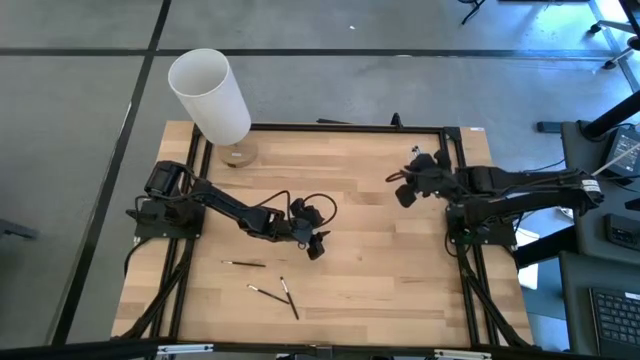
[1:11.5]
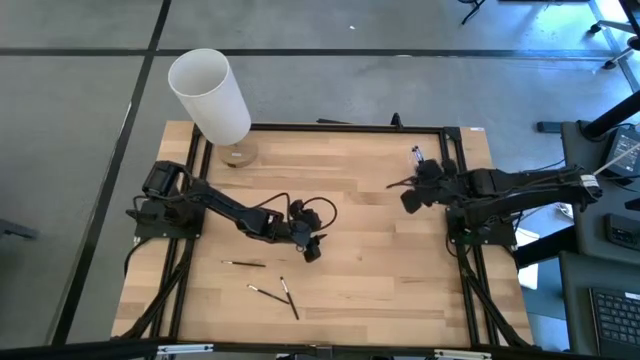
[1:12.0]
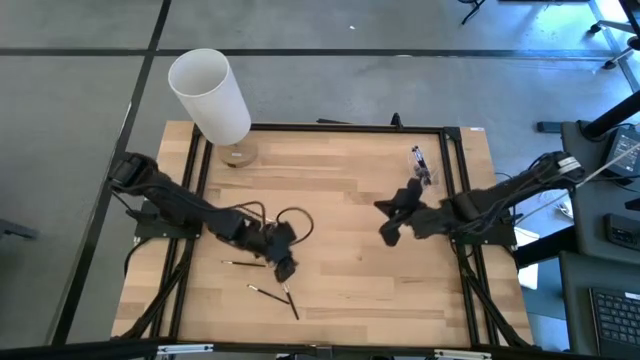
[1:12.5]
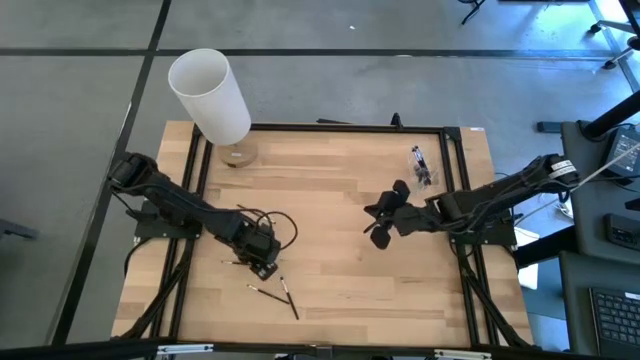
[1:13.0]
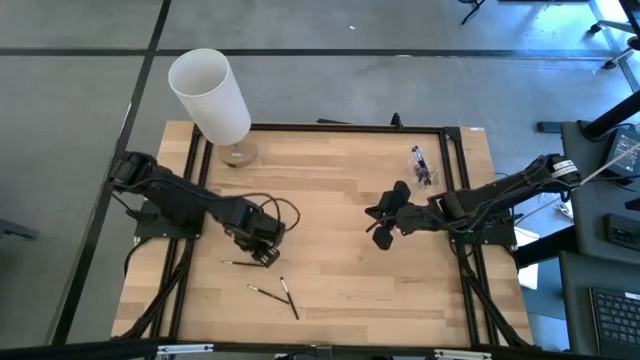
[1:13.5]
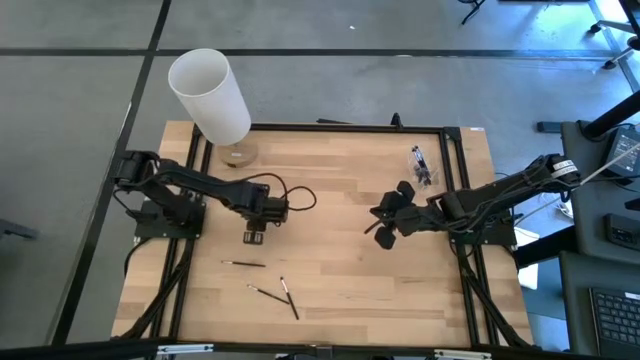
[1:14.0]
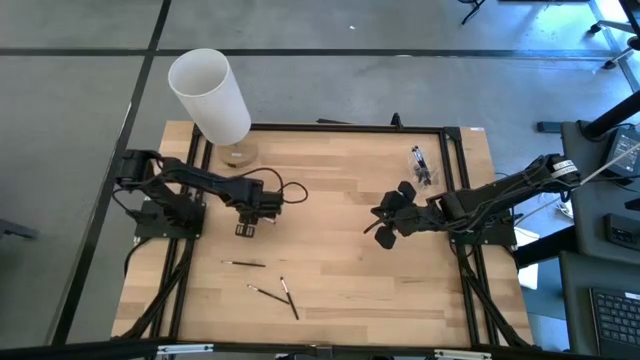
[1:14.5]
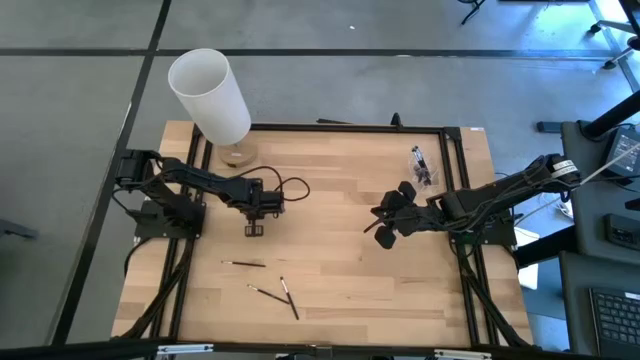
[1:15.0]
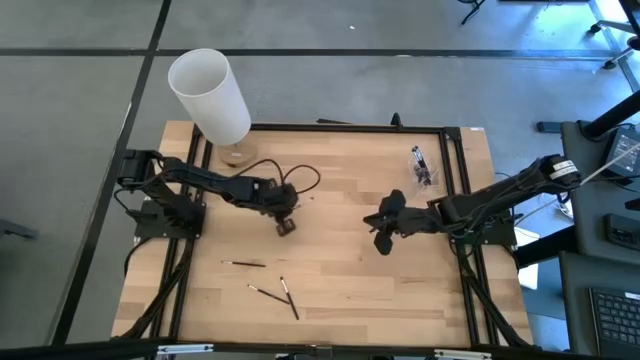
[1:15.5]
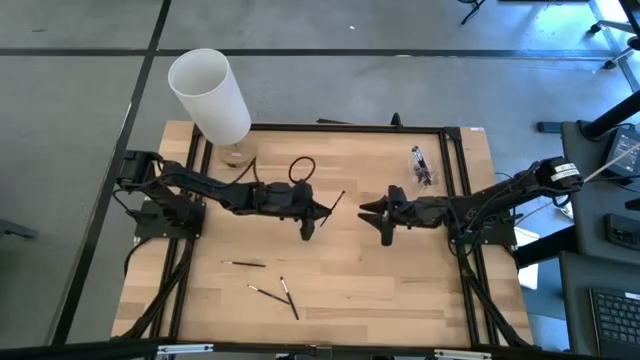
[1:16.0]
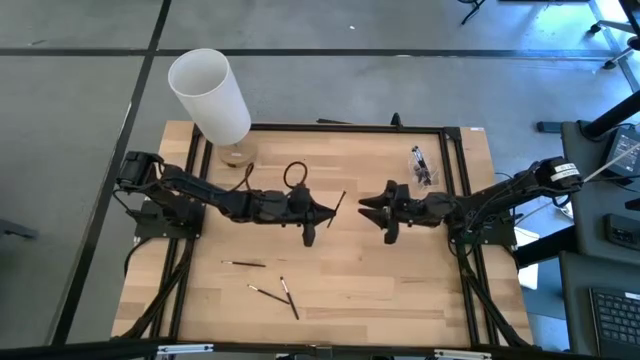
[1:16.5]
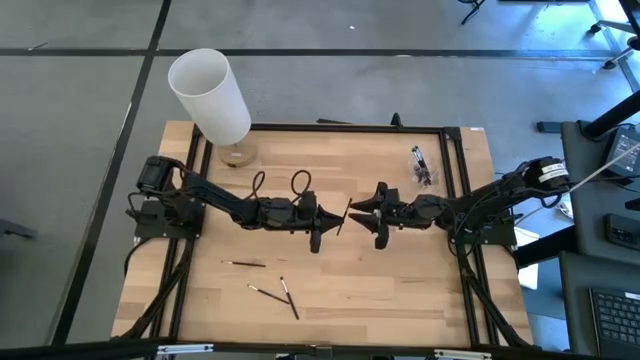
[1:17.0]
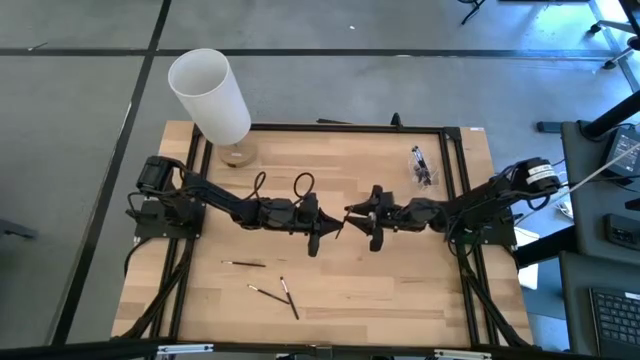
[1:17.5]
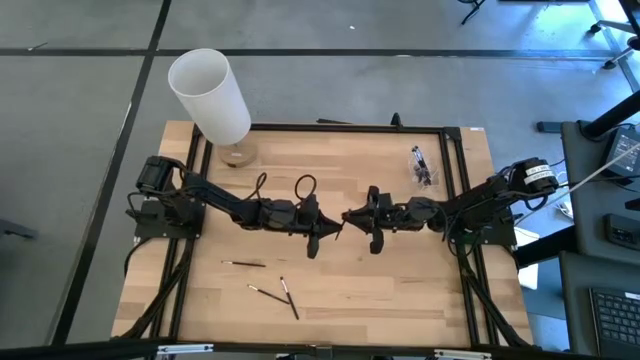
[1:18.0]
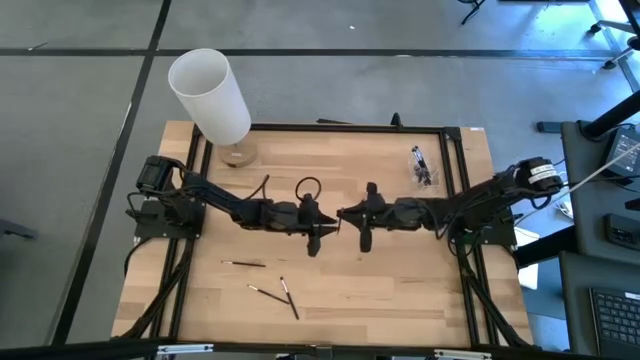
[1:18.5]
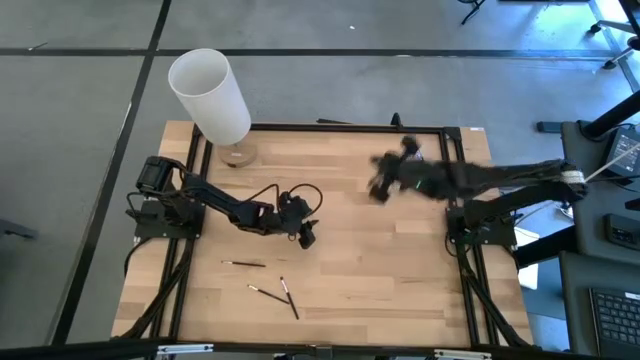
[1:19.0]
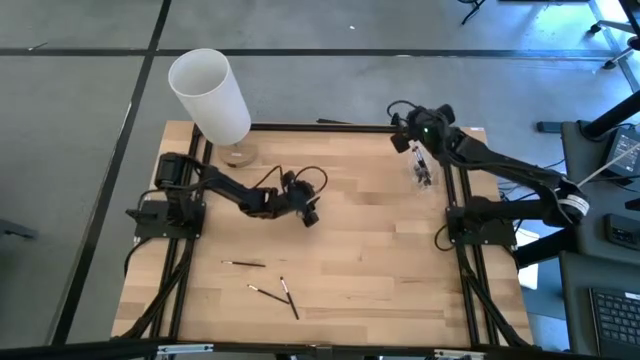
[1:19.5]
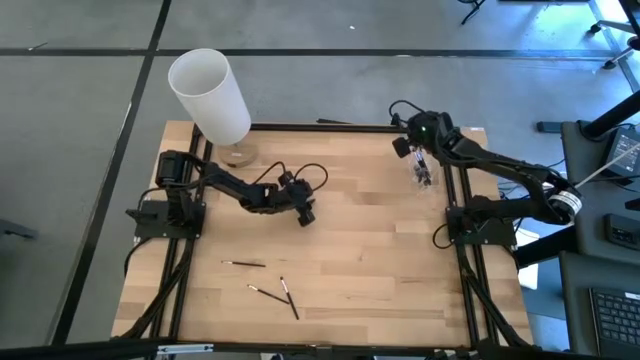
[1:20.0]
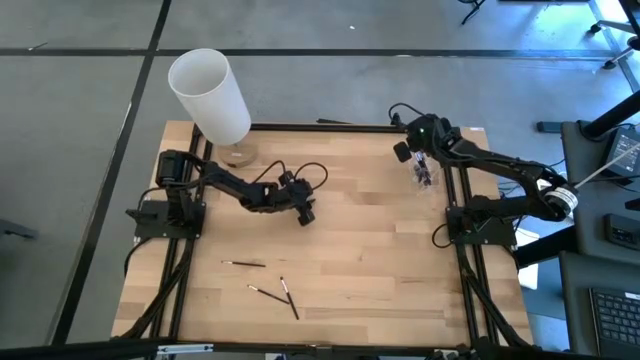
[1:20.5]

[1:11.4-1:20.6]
Task: Sort items
Put the eyeshadow brush into the top section of the transparent organizer

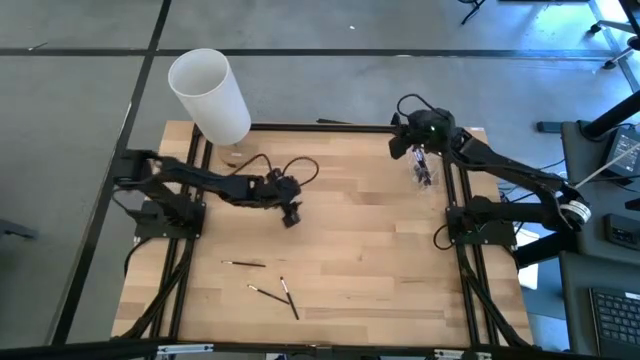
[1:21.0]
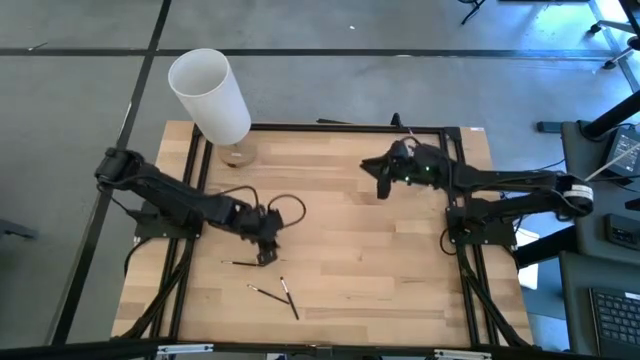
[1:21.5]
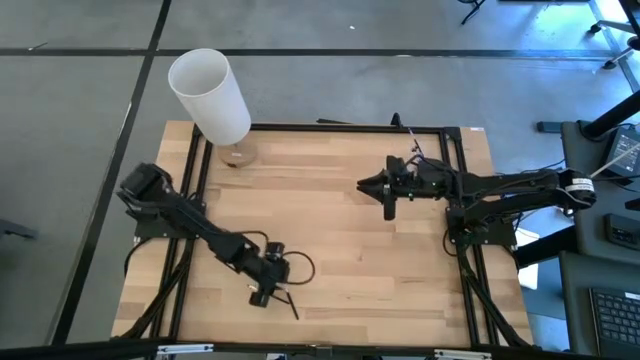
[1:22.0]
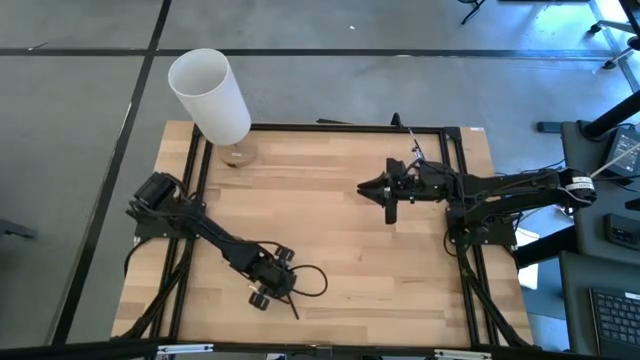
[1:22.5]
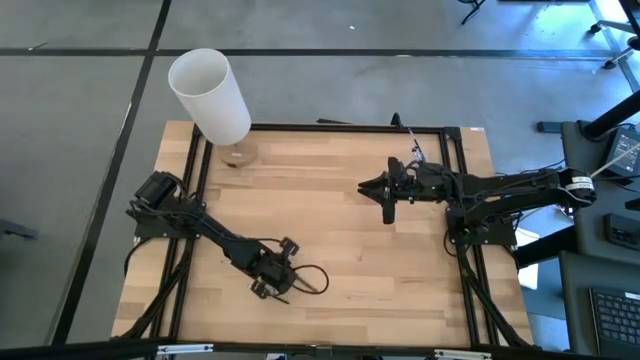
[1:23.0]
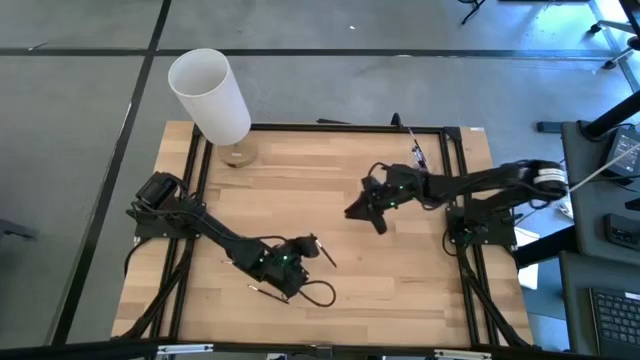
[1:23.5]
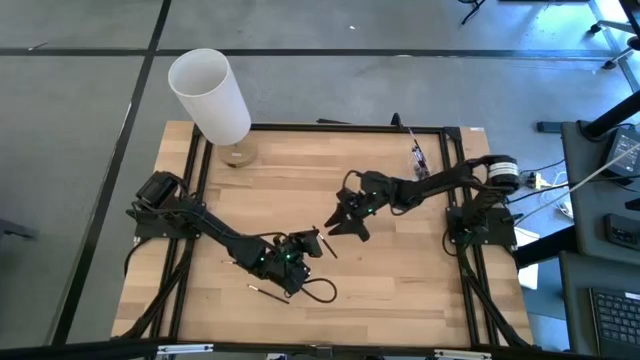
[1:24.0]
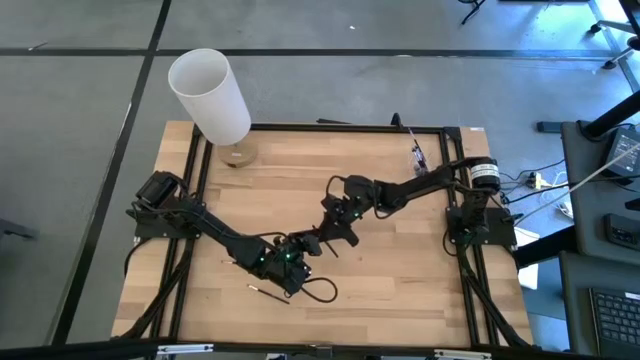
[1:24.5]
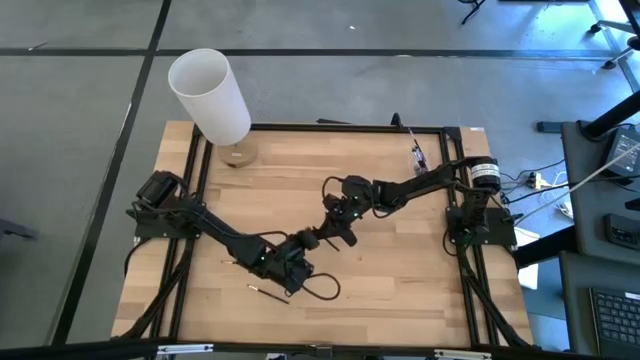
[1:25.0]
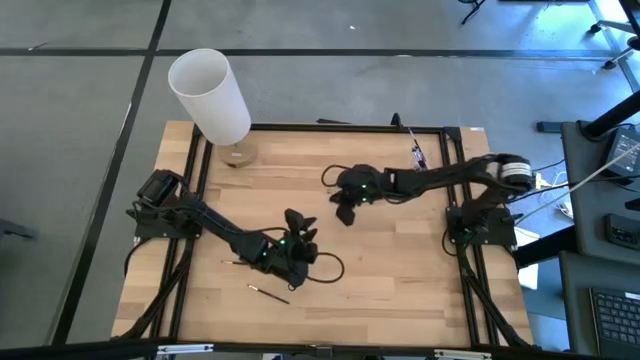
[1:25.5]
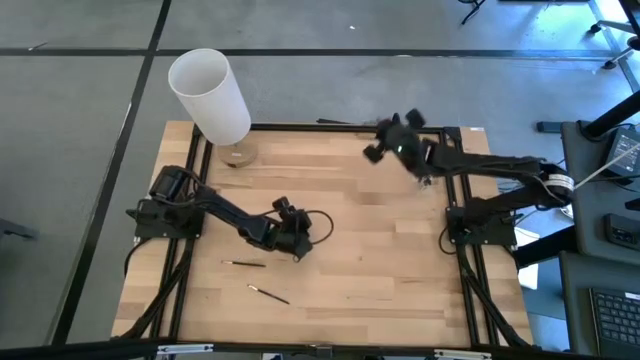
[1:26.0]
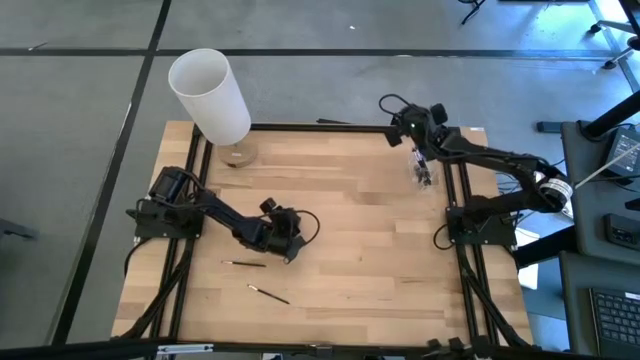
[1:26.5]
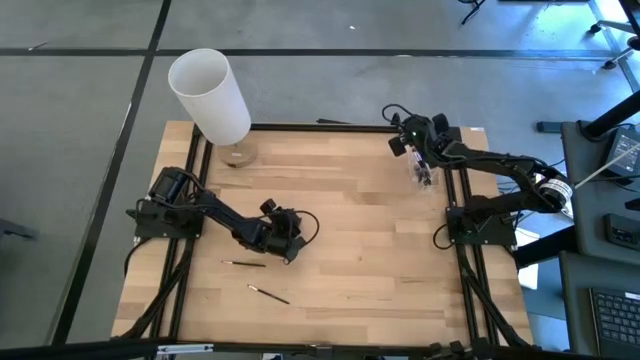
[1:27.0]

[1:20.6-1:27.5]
Put the lip brush into the top section of the transparent organizer

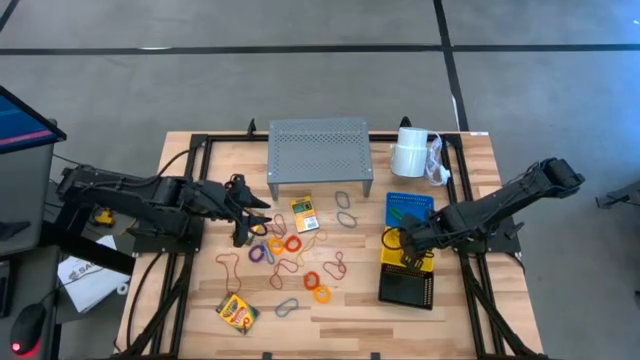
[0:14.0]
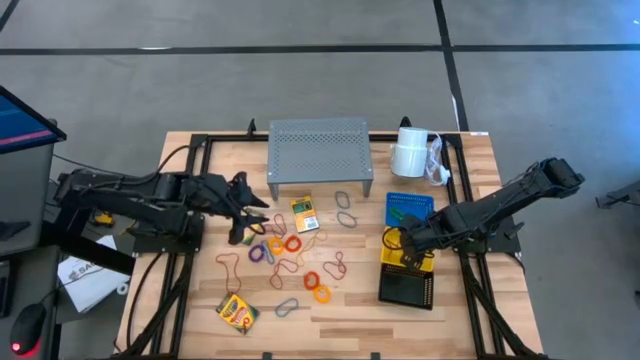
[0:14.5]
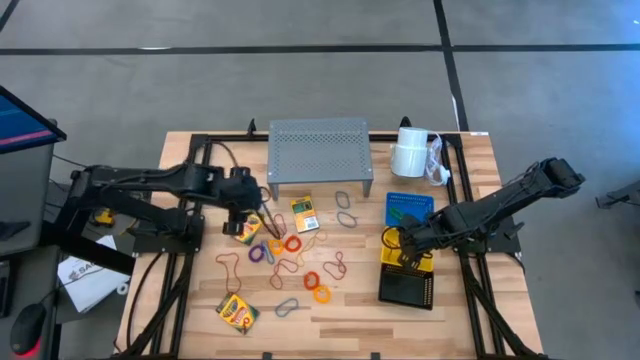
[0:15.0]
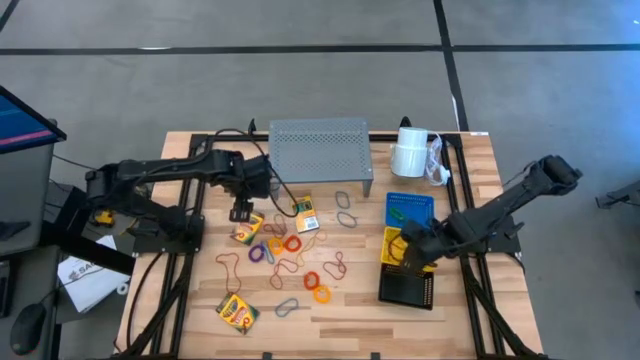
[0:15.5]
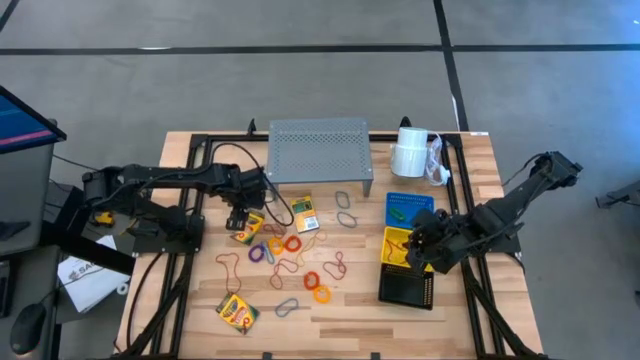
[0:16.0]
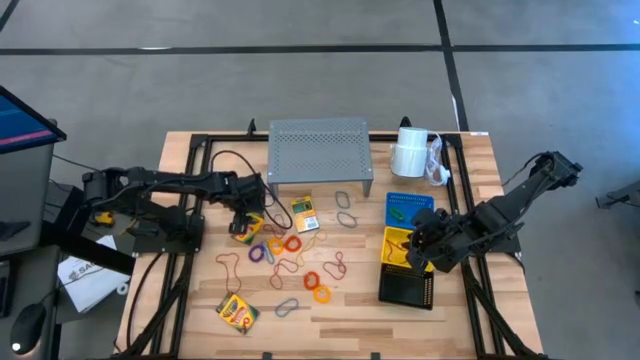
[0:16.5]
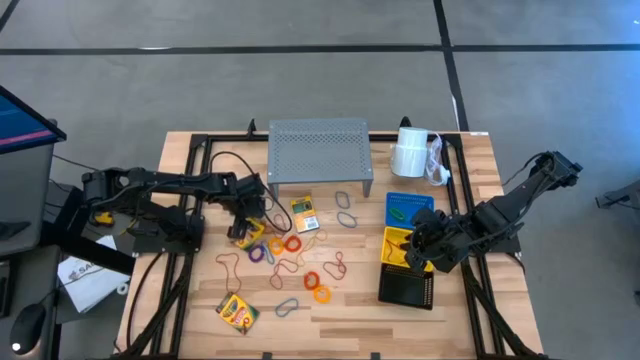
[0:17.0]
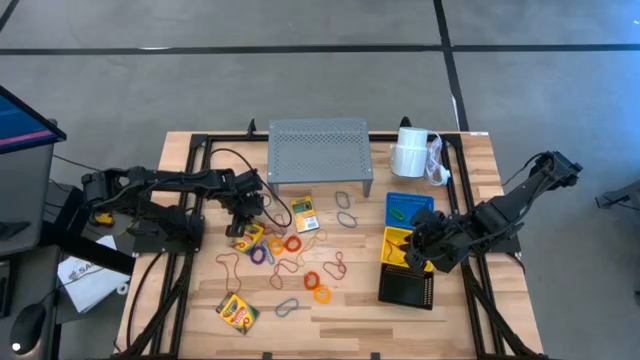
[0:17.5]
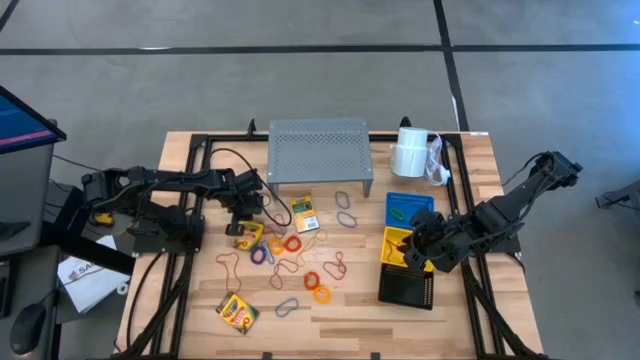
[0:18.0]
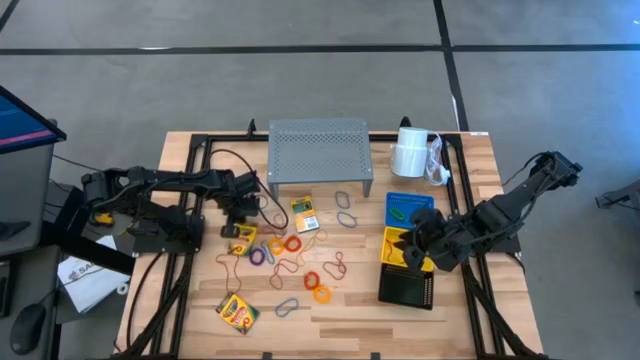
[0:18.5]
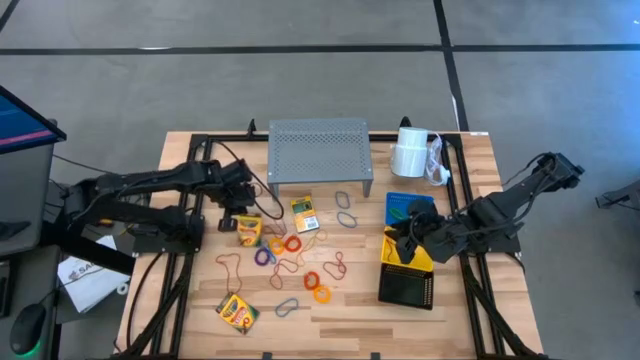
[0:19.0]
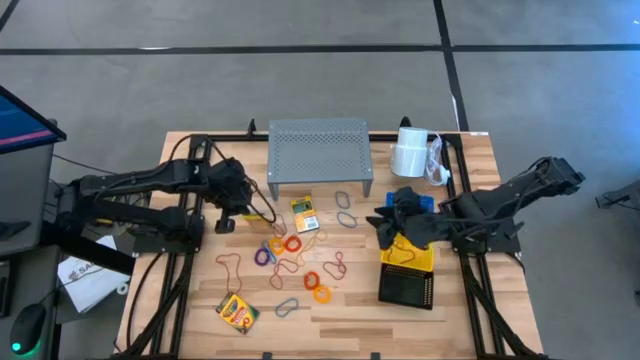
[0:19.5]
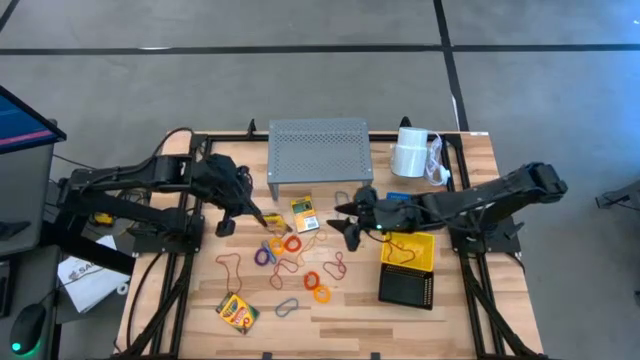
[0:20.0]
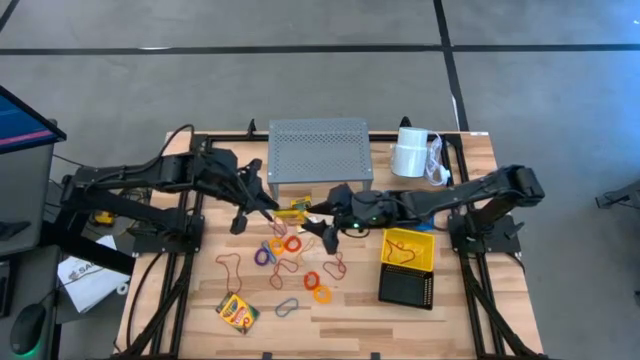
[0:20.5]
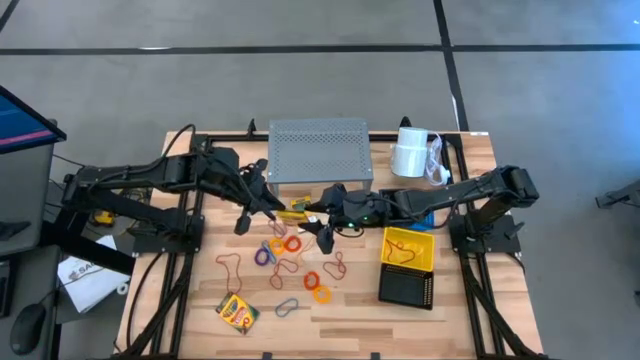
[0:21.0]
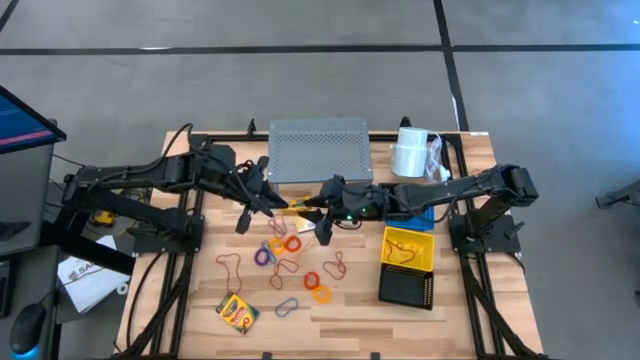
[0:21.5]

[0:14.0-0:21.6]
Task: Pick & Place Office Desk Supplies
Put the crayon box into the black basket
